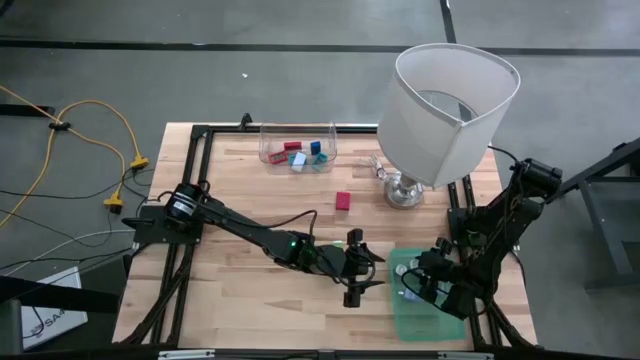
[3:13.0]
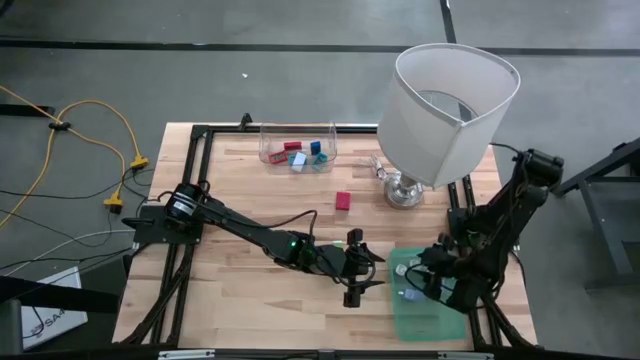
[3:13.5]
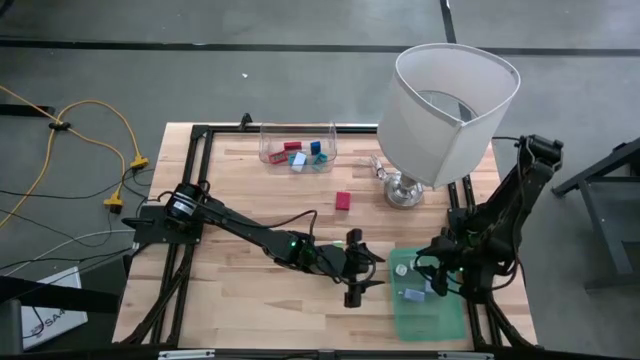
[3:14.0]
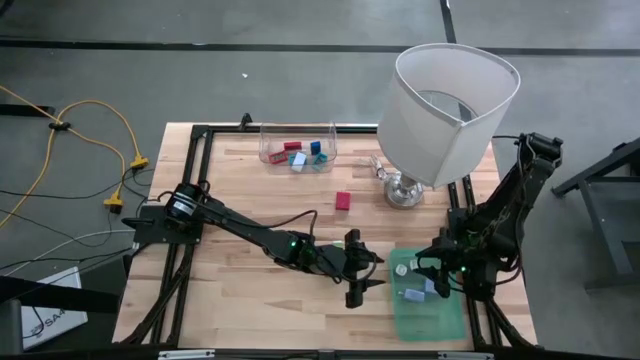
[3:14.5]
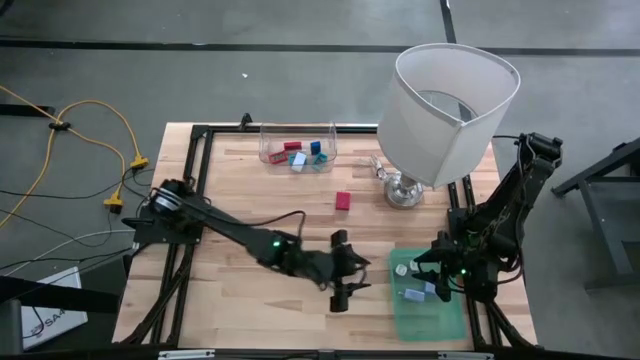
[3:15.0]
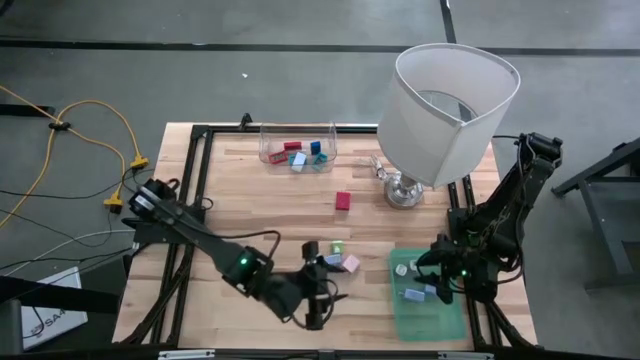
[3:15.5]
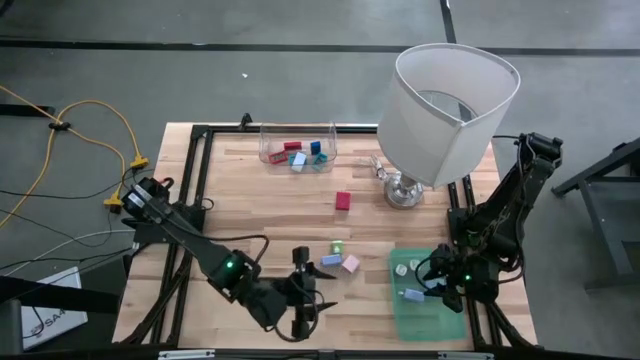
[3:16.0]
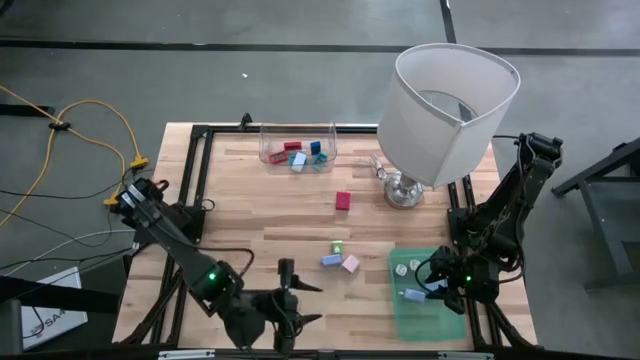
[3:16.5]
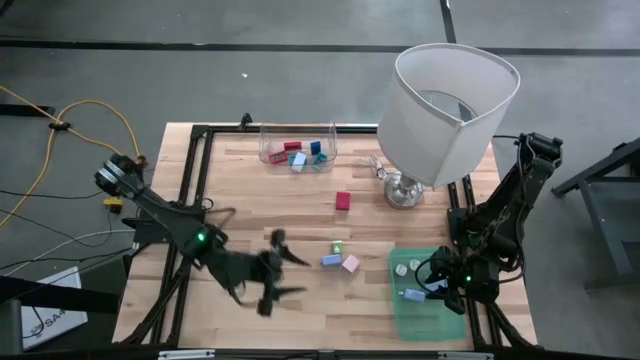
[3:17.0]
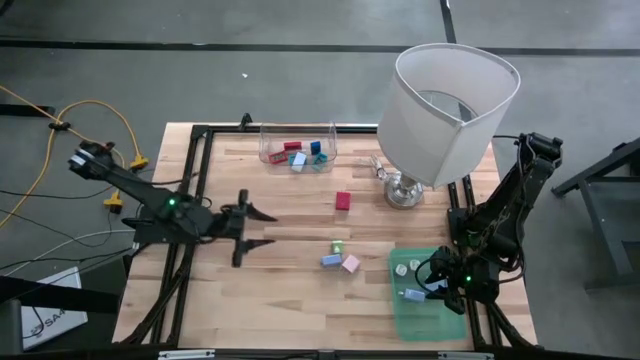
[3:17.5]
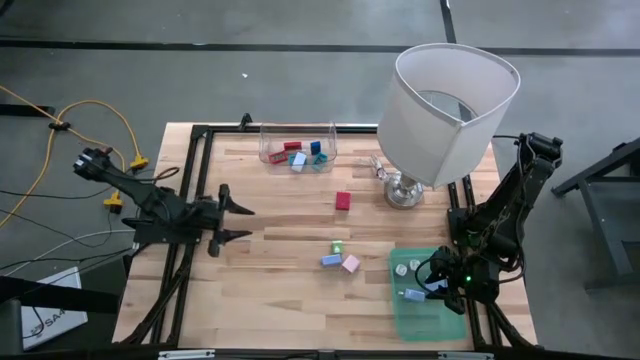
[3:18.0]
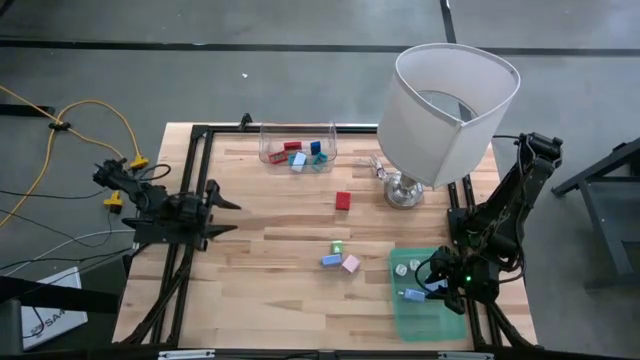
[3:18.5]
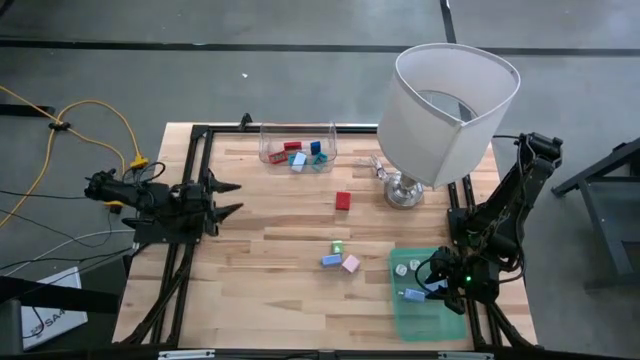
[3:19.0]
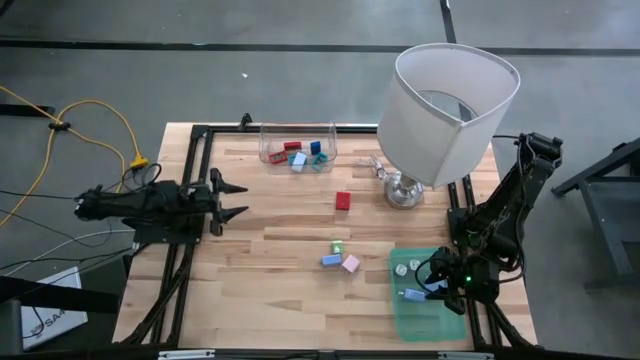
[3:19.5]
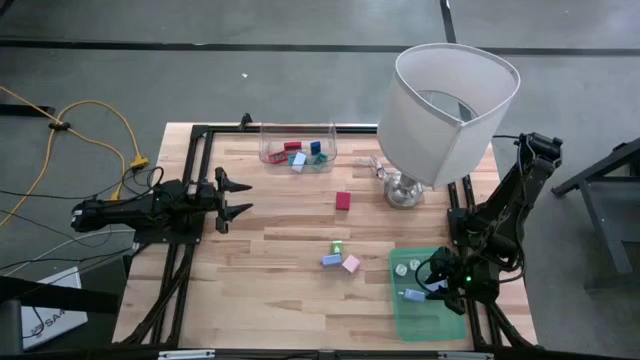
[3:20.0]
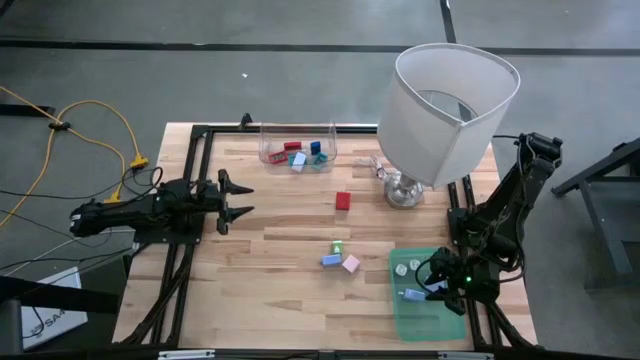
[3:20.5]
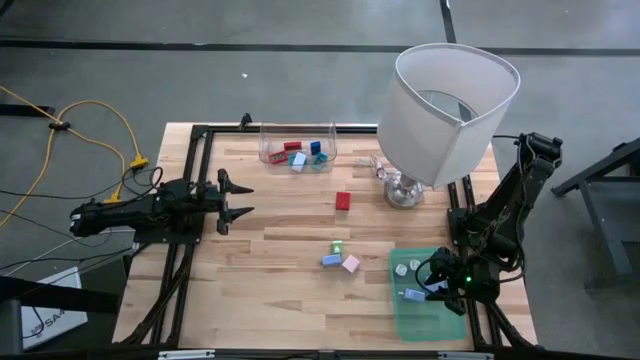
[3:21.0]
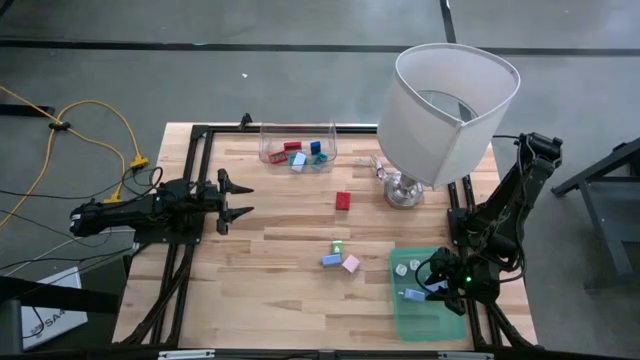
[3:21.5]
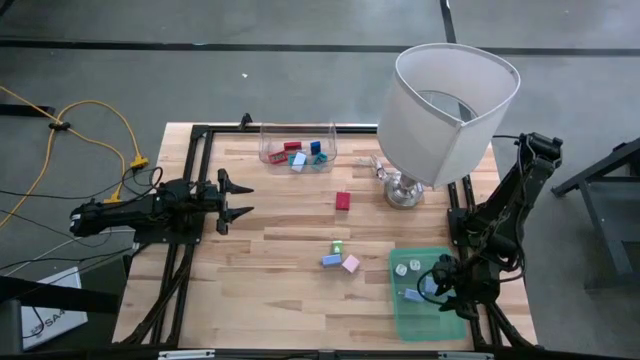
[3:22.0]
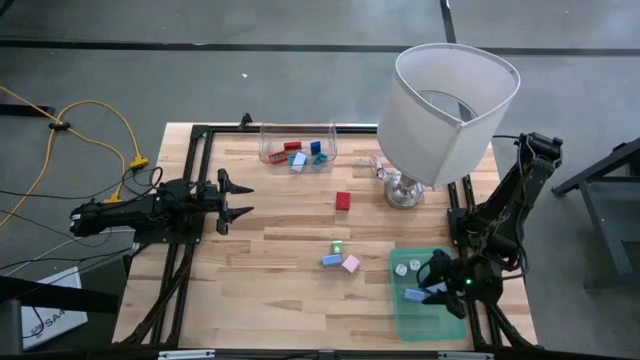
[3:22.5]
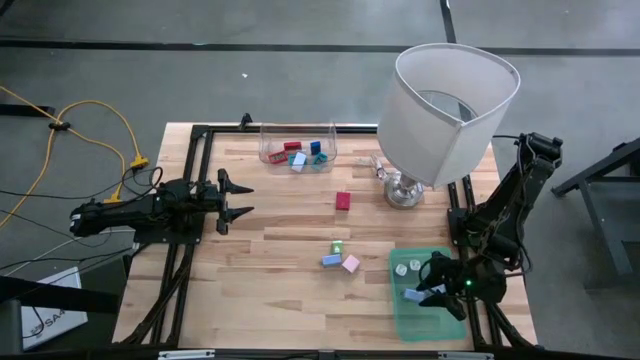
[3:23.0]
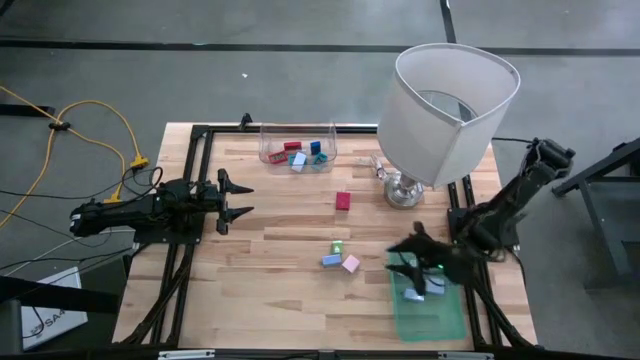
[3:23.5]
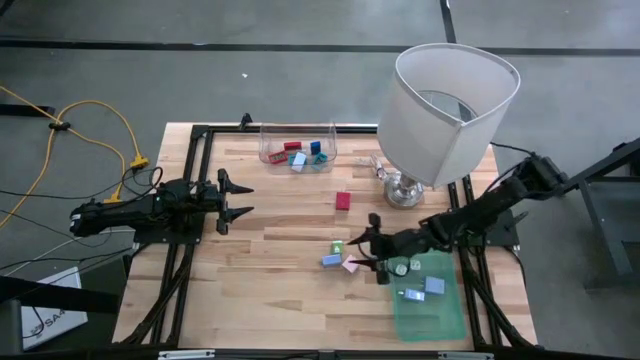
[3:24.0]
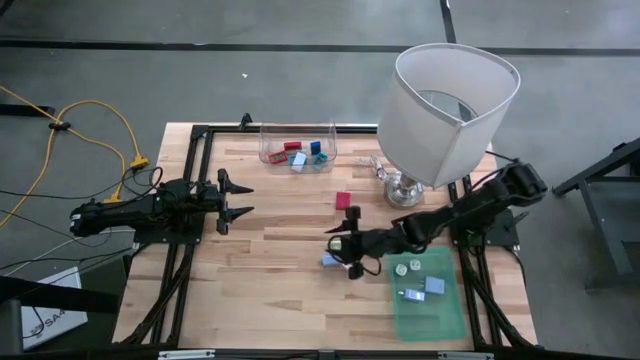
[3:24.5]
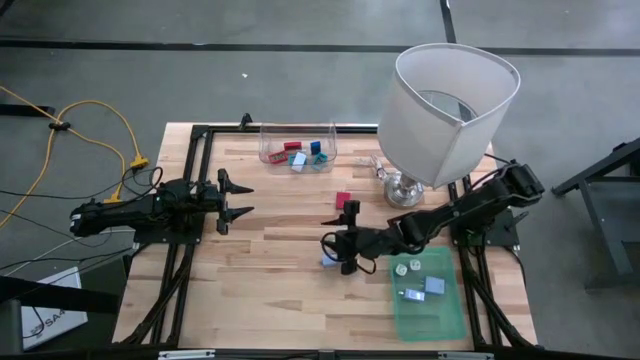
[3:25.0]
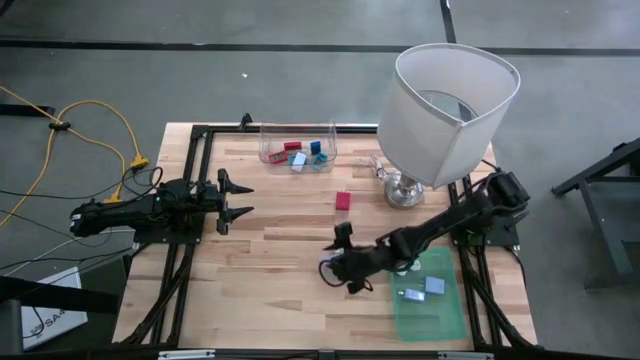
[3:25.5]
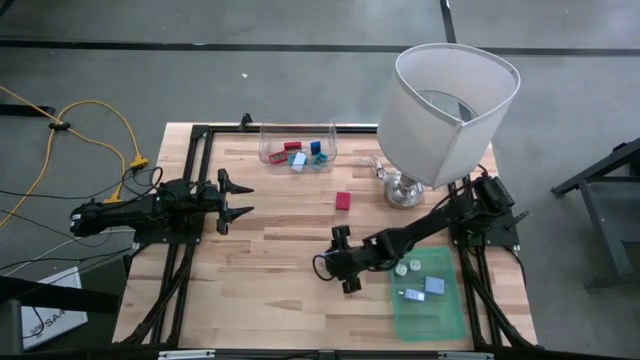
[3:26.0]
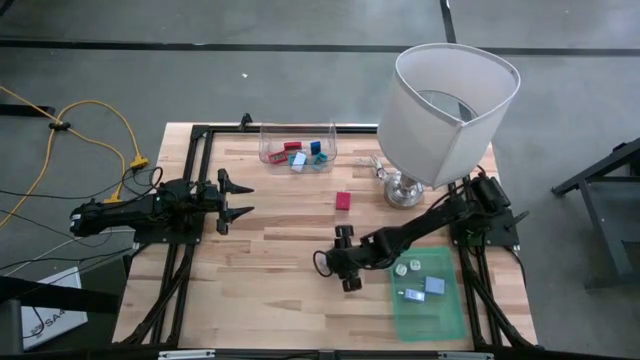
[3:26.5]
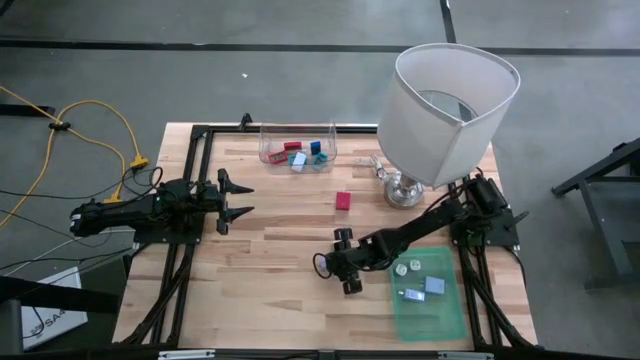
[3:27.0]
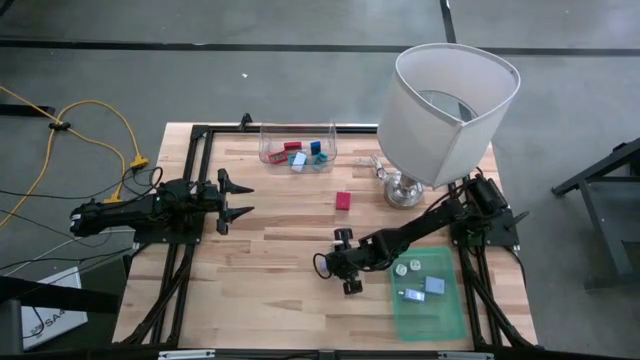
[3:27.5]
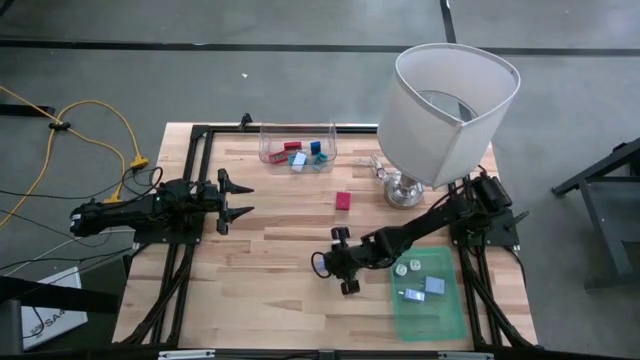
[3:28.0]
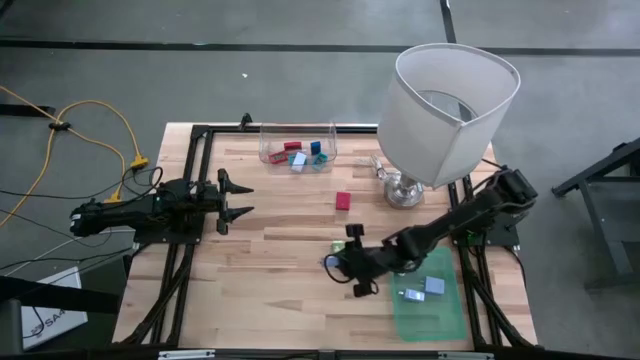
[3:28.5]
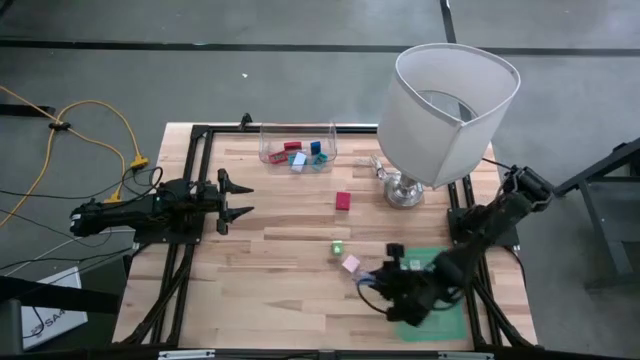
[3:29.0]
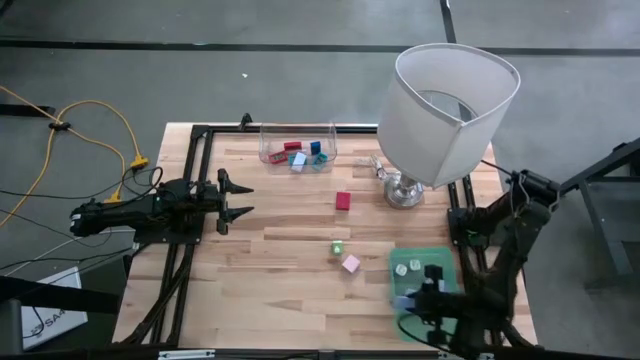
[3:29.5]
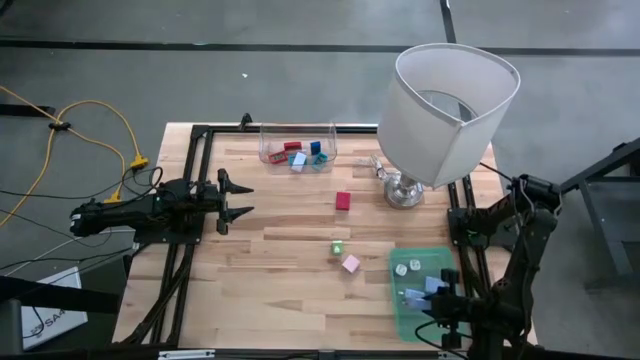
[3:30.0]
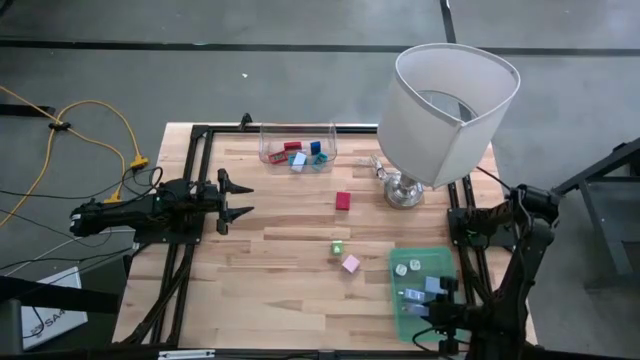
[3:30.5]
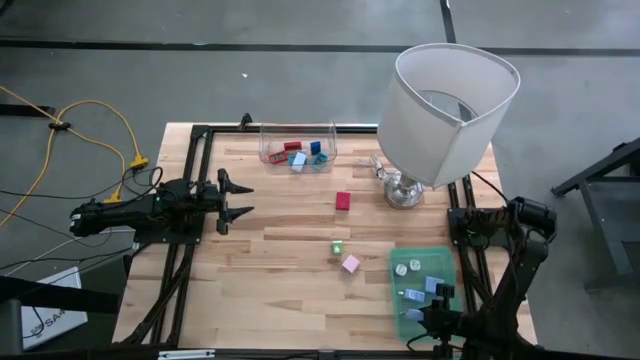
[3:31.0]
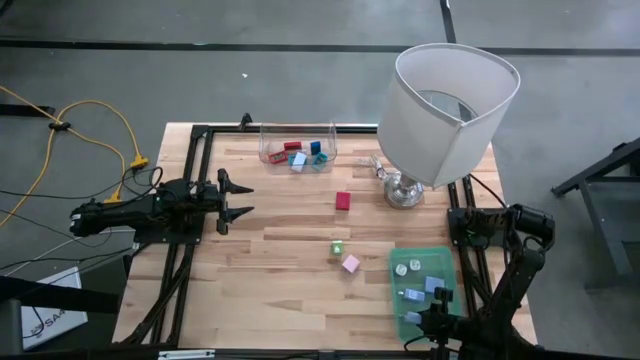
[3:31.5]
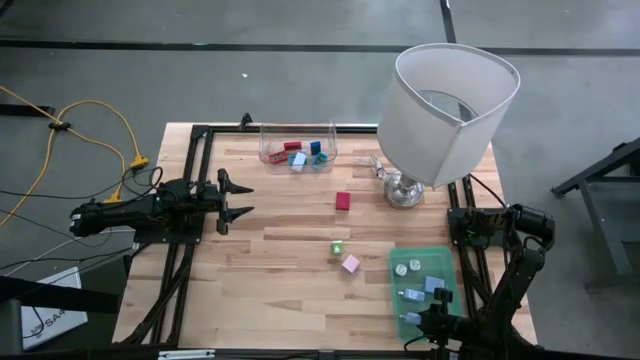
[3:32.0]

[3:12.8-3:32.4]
Task: Pick & Place Office items
Put the light blue charger adapter into the green bin

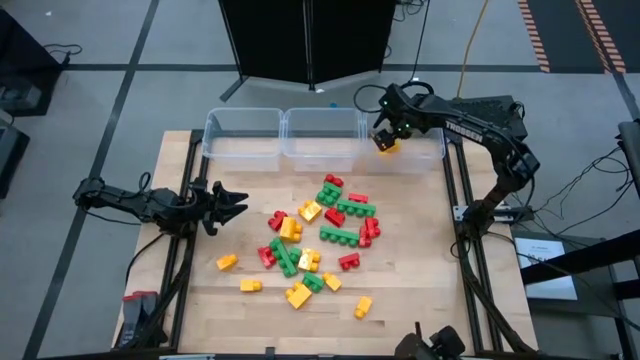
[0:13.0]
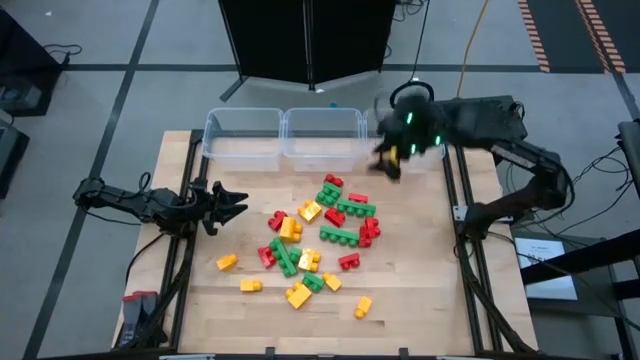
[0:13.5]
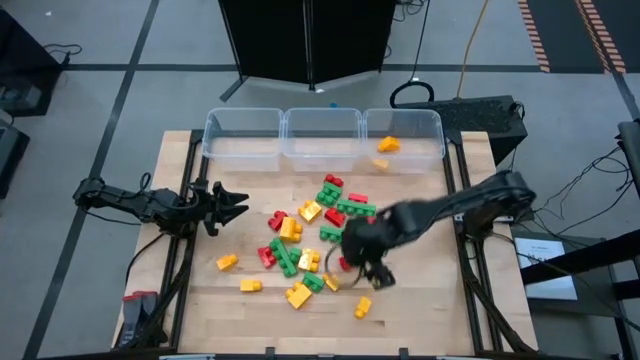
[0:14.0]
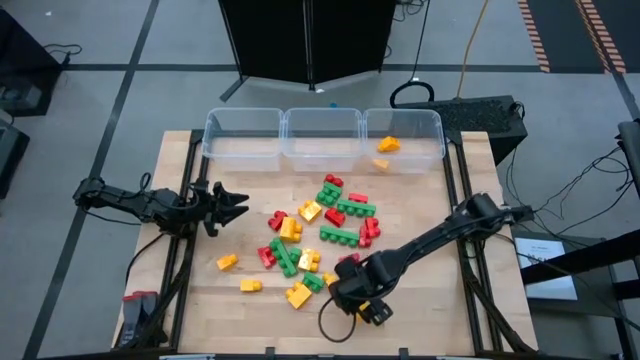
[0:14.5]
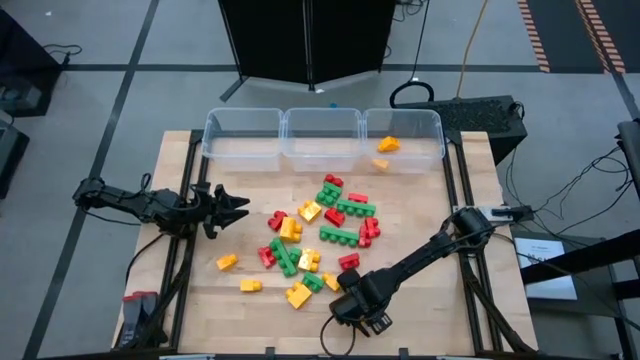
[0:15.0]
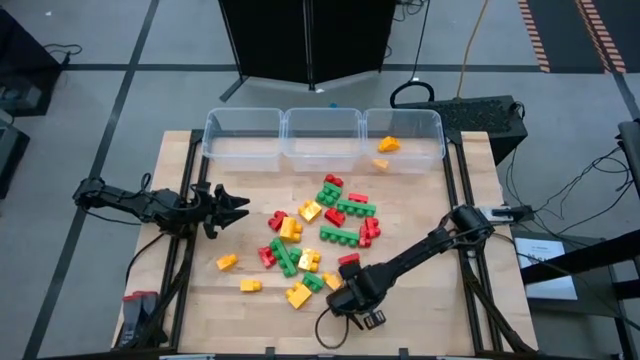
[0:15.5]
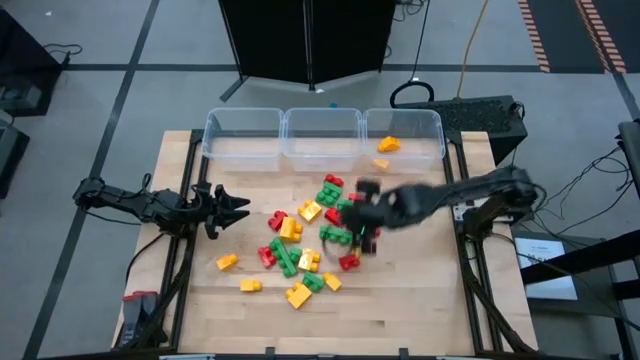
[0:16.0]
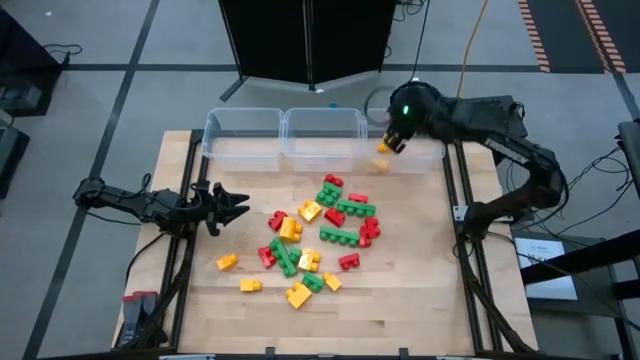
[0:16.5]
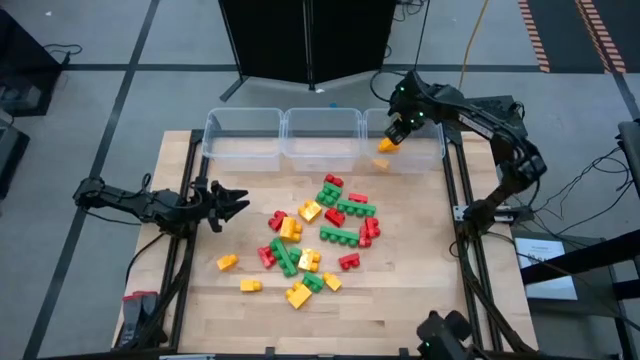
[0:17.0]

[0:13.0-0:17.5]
Task: Sort blocks
Put the yellow game piece with 1 stud into the right transparent bin
